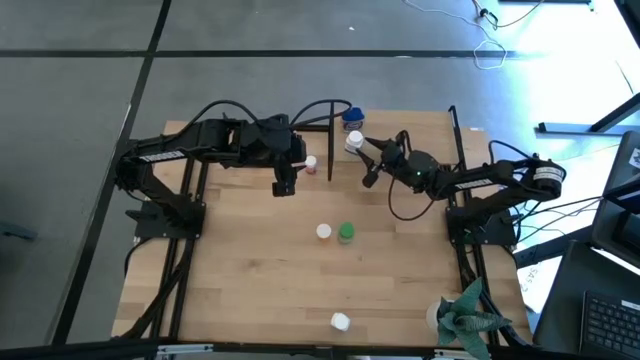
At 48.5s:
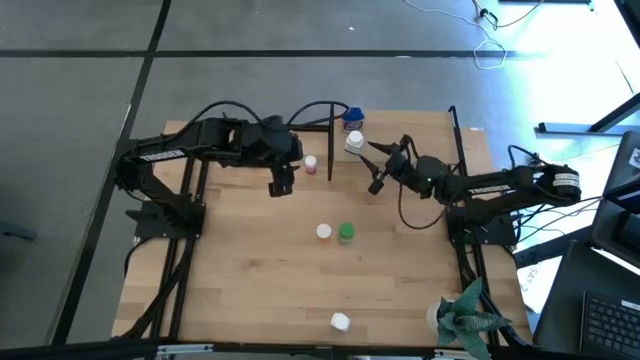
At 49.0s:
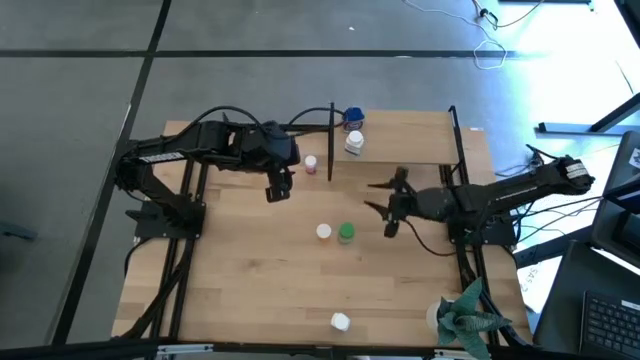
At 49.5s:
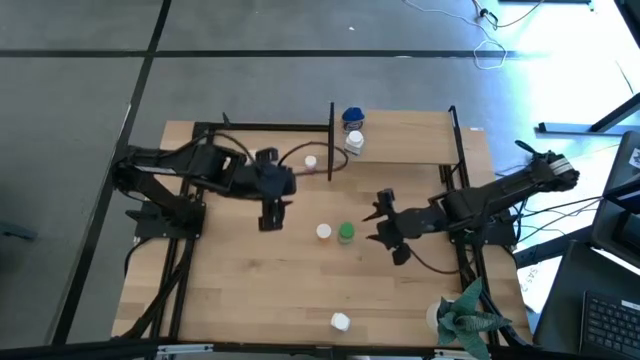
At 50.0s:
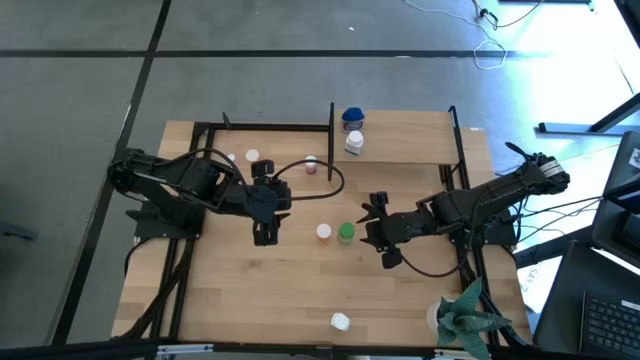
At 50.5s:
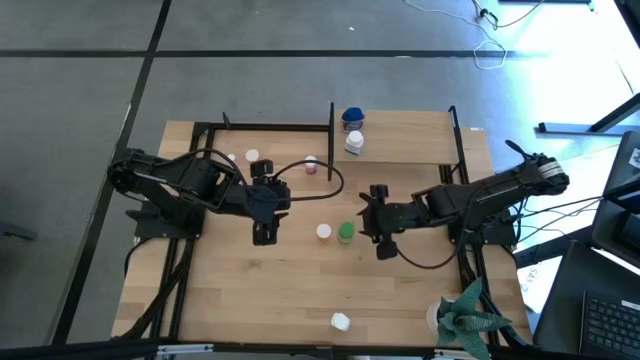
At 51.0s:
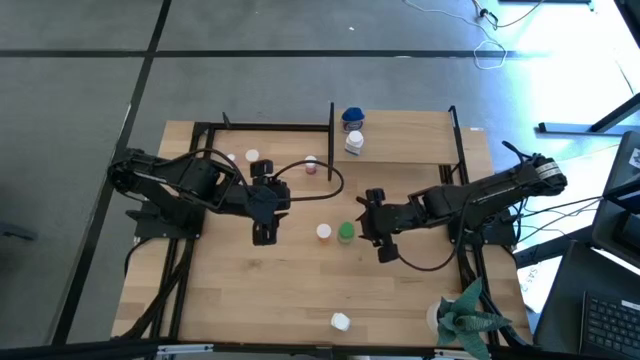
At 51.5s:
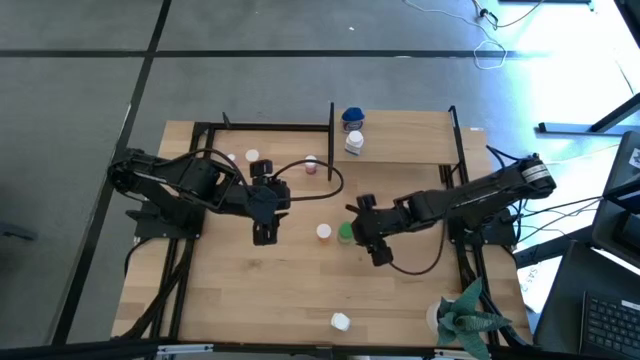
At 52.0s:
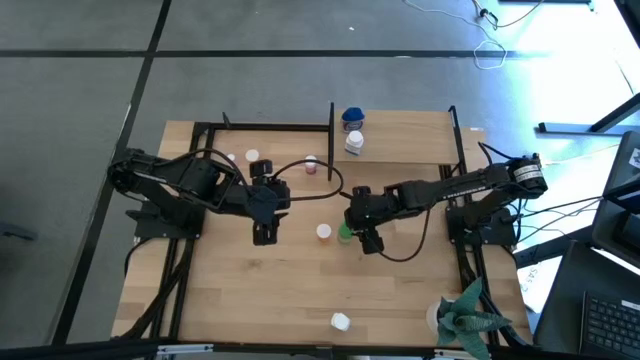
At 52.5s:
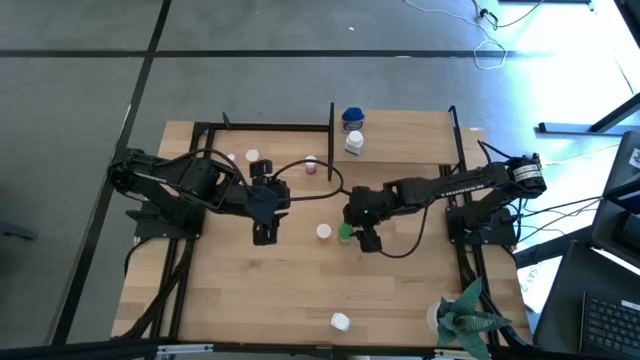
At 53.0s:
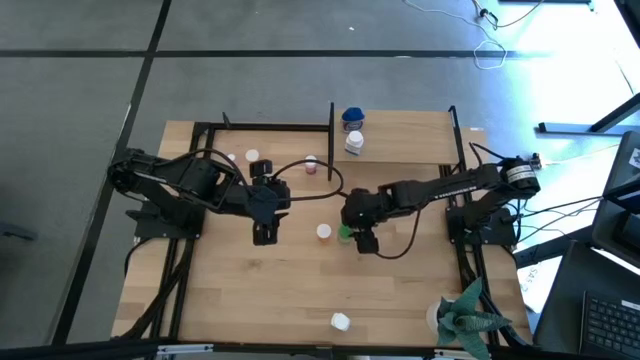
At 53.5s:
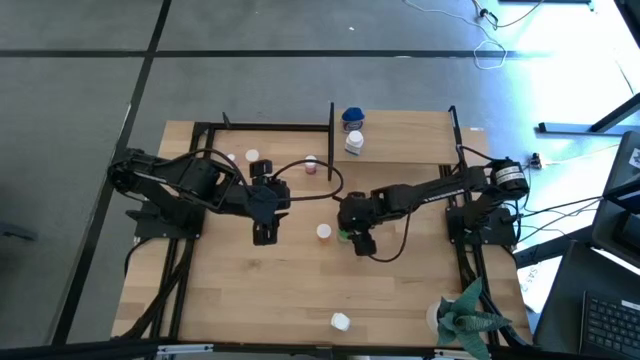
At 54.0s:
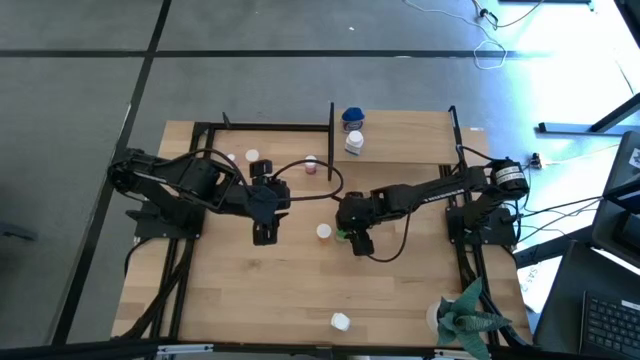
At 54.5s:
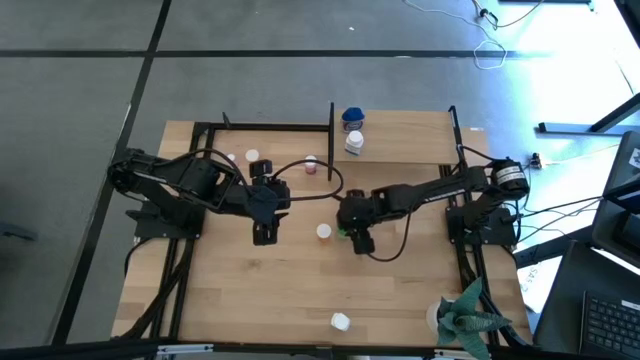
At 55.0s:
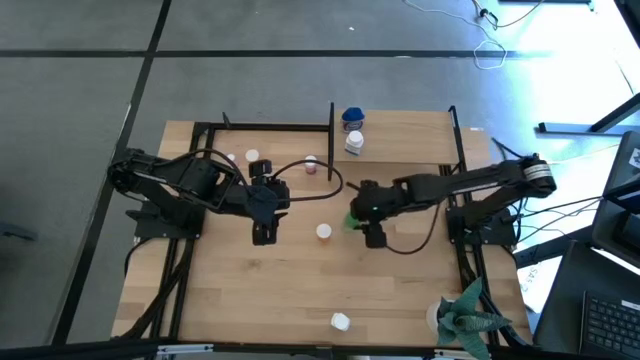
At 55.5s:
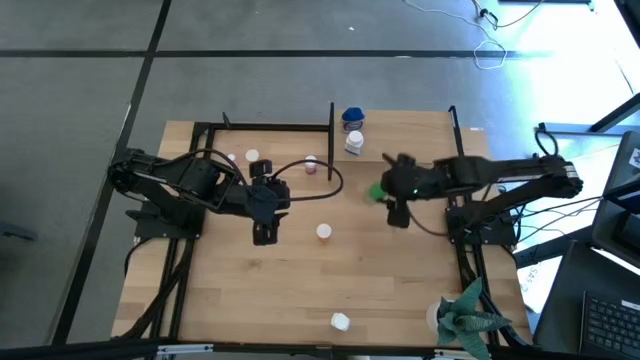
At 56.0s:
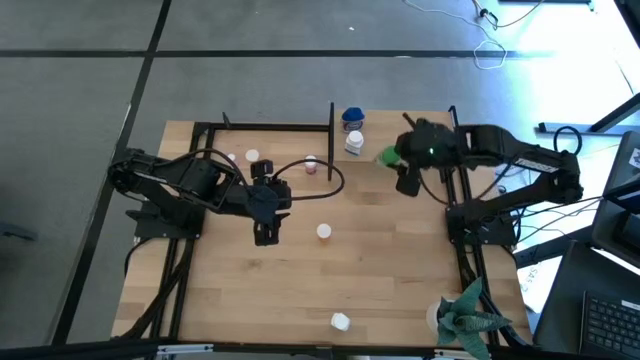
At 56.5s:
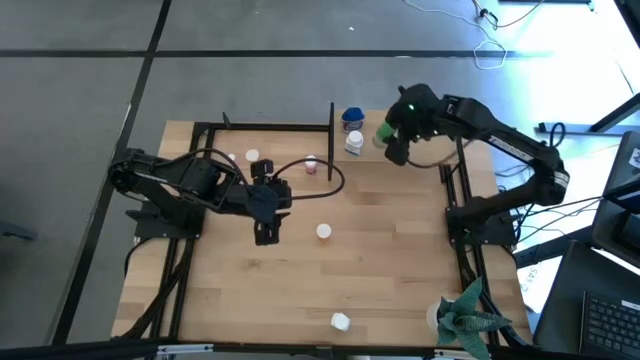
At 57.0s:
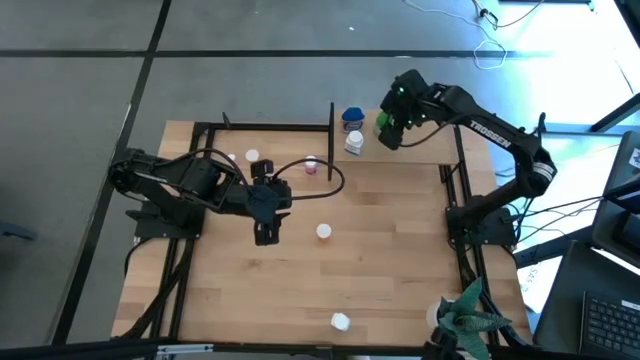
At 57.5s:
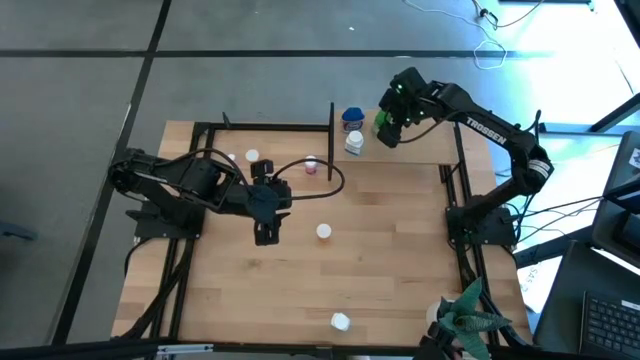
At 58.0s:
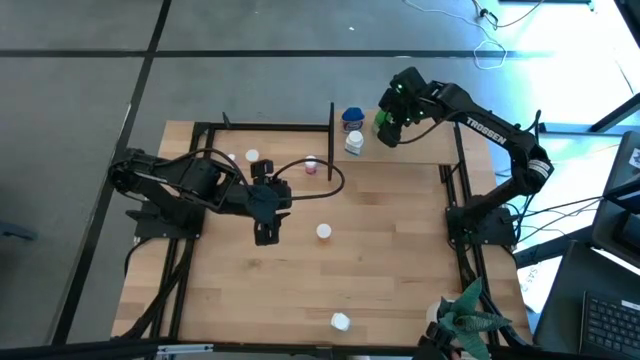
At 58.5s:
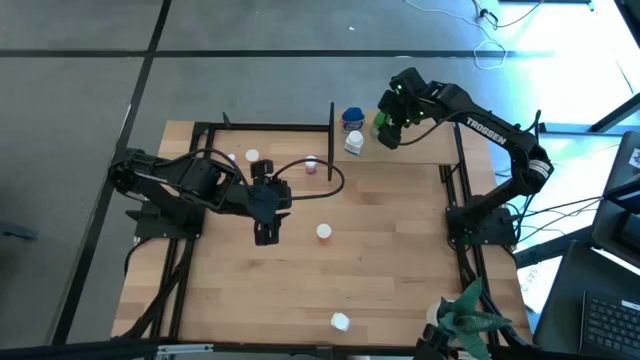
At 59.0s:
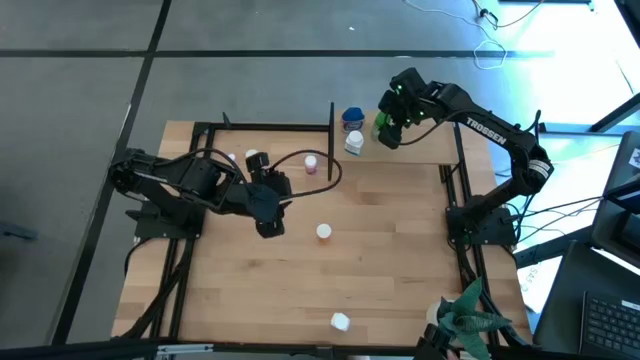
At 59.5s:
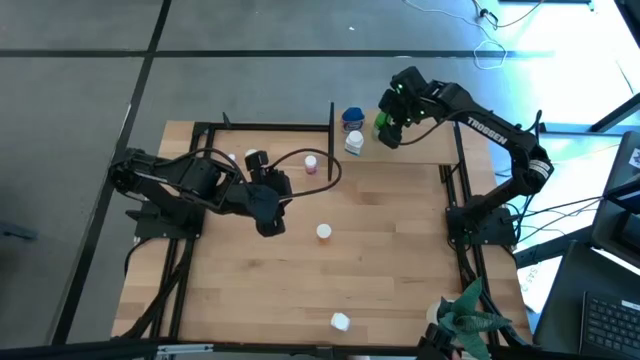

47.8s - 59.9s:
Task: Pick and place medicine bottles onto shelf by color
Put the green medicine bottle on the shelf

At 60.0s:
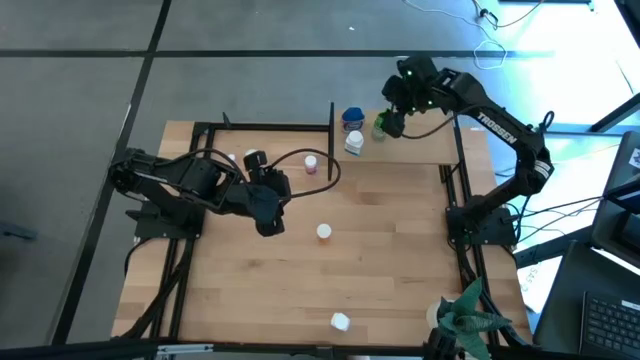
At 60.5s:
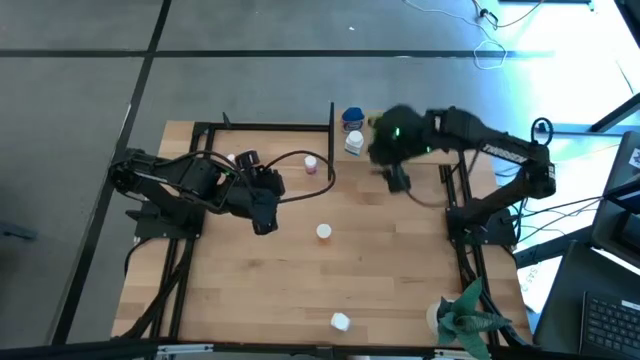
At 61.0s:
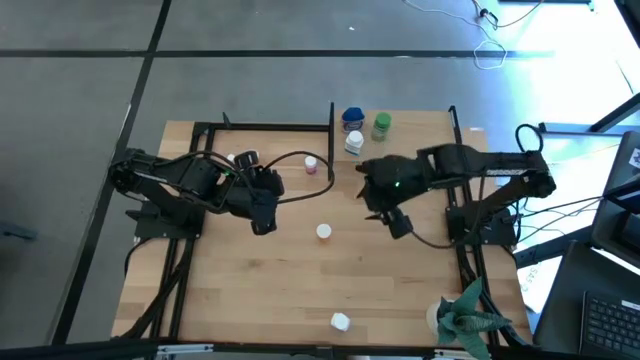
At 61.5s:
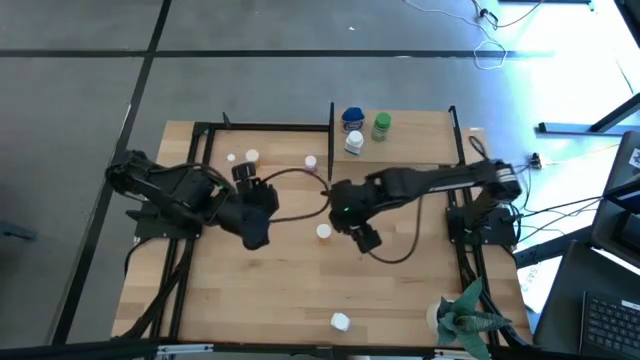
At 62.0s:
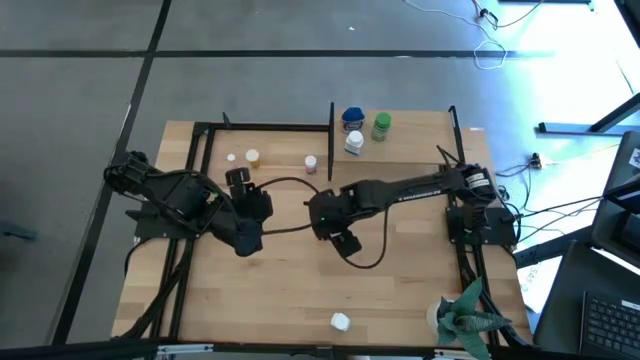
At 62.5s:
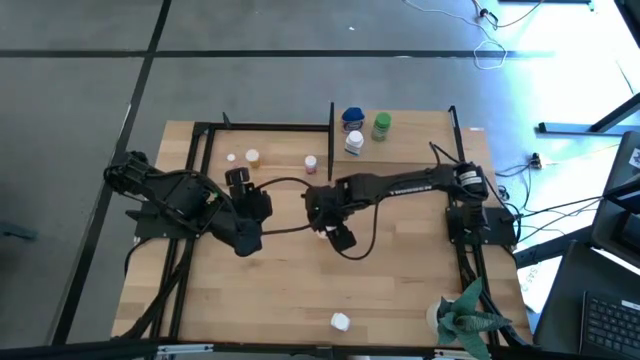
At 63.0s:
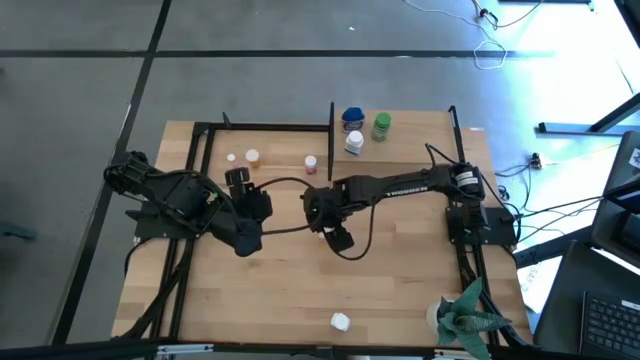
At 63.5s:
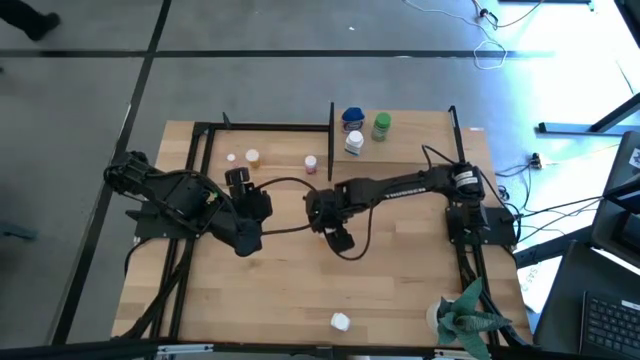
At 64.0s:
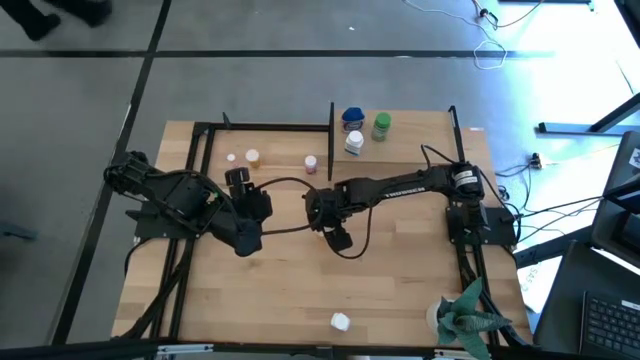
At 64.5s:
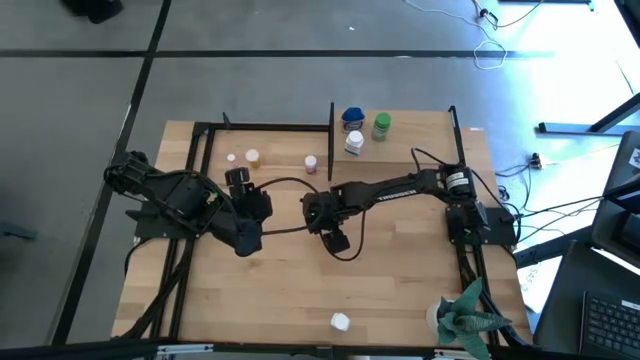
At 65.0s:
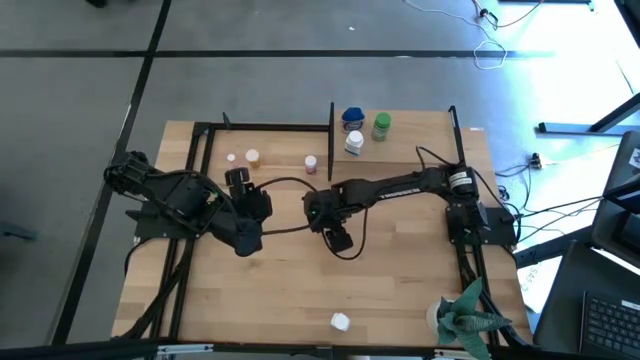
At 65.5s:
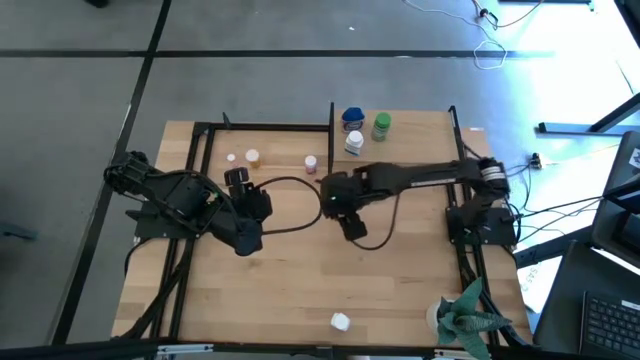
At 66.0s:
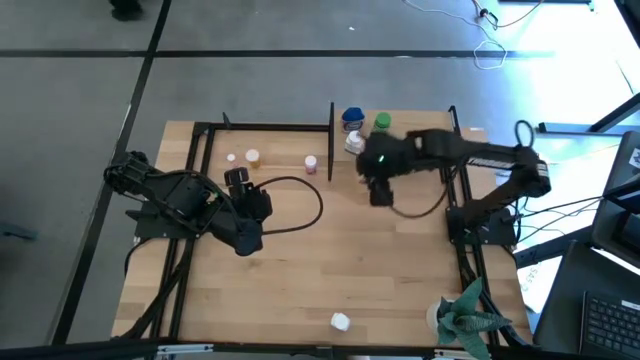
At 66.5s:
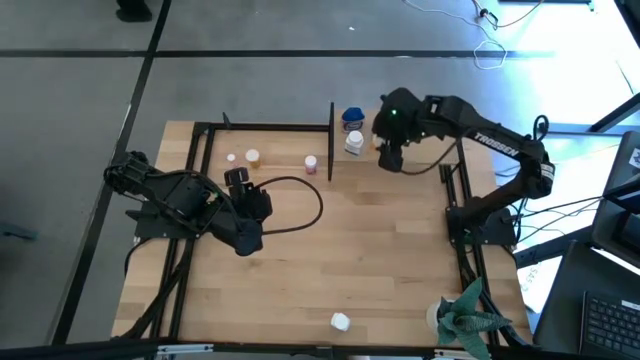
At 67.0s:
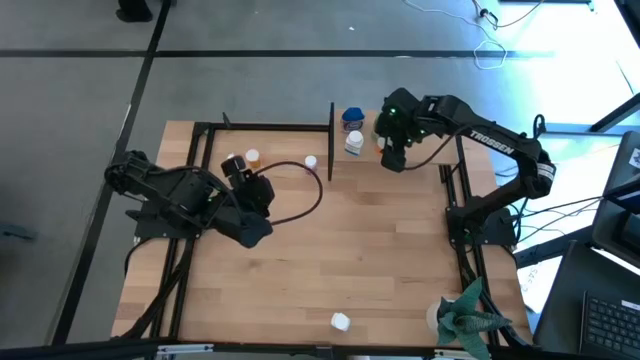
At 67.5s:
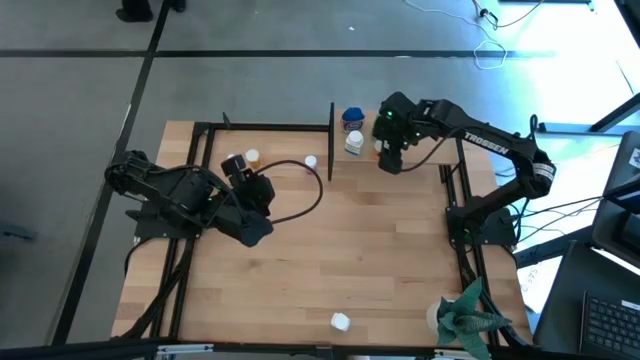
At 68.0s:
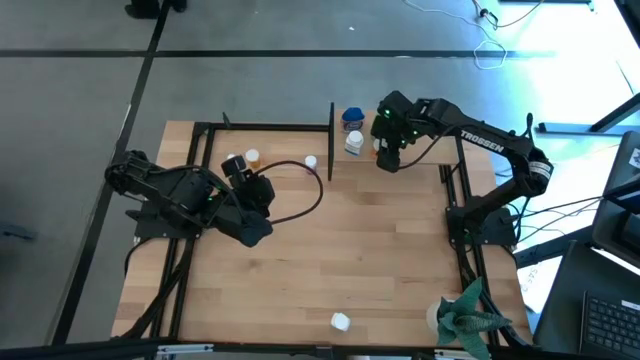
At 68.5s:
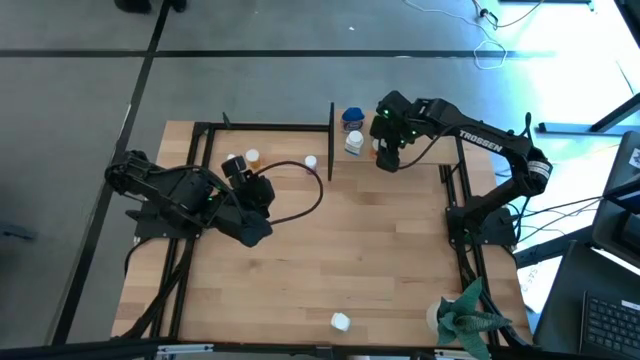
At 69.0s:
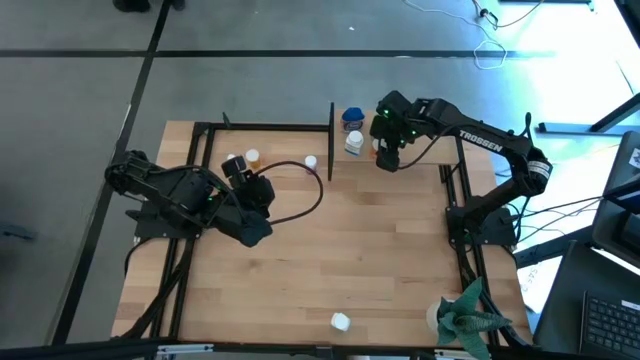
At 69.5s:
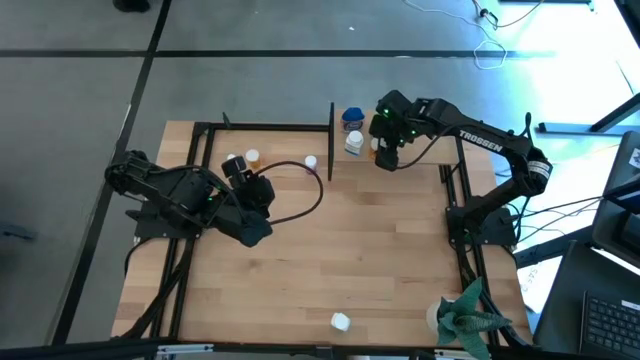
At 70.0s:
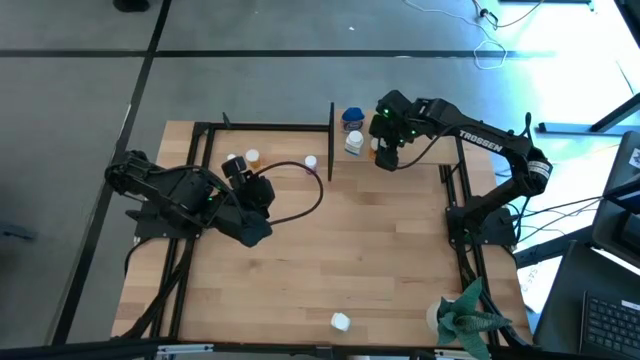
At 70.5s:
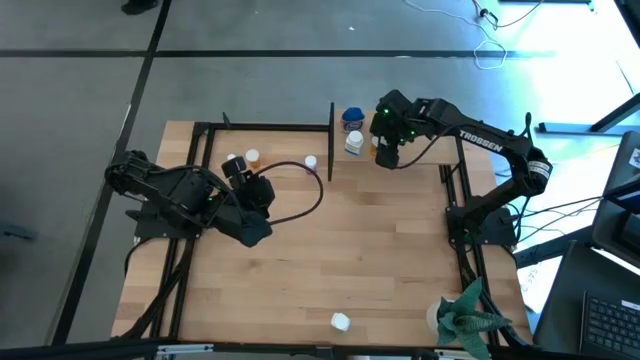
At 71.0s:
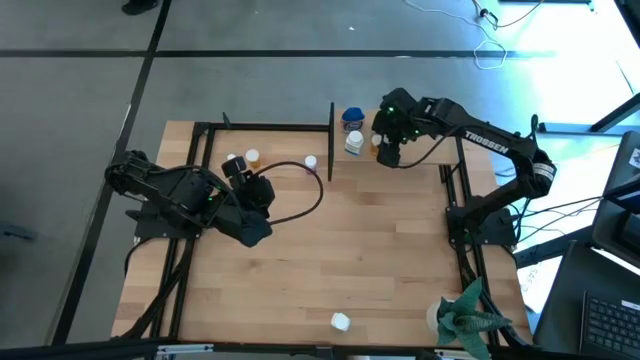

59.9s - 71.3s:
Put the bottom orange medicine bottle on the shelf
